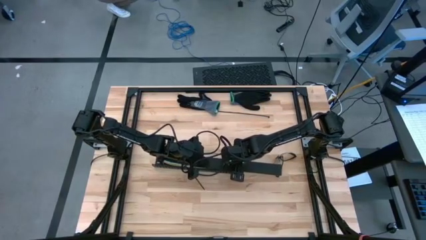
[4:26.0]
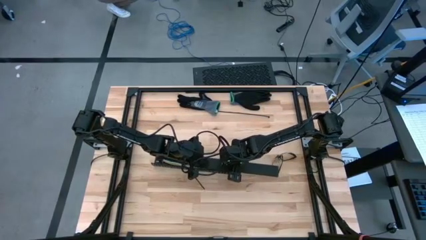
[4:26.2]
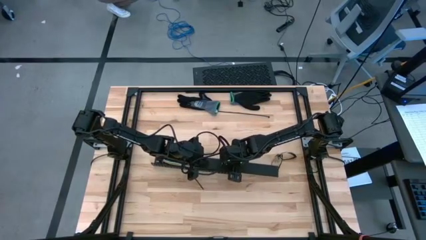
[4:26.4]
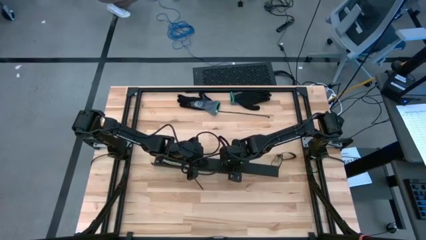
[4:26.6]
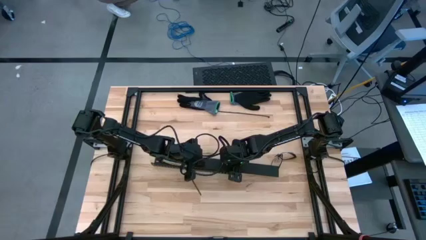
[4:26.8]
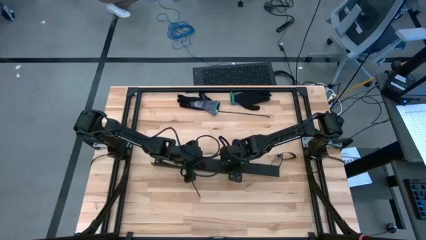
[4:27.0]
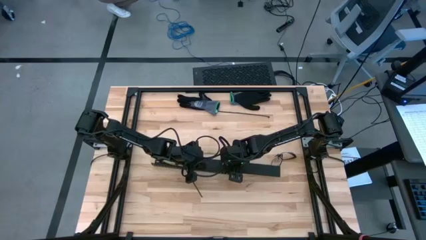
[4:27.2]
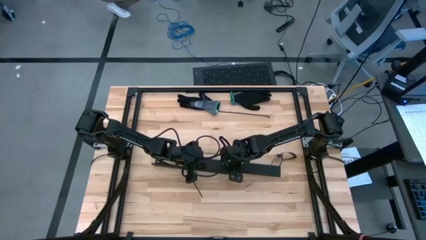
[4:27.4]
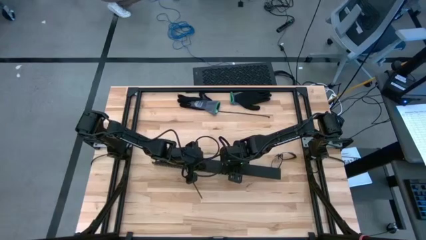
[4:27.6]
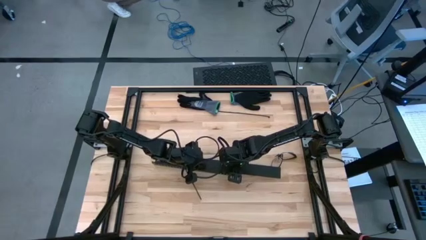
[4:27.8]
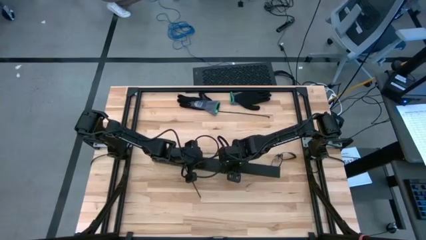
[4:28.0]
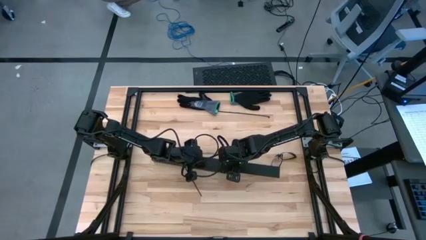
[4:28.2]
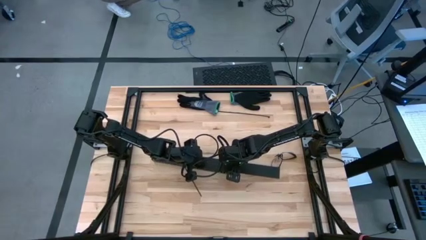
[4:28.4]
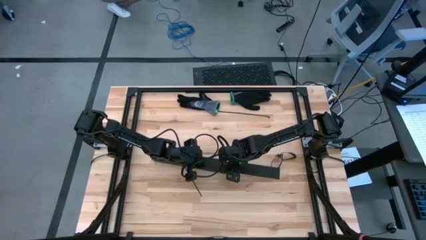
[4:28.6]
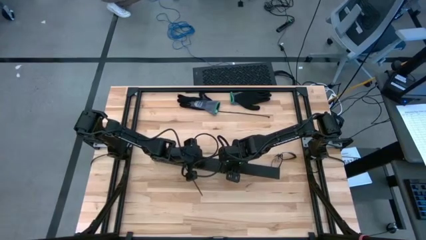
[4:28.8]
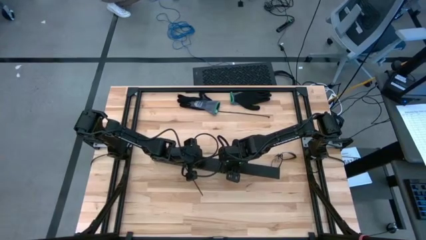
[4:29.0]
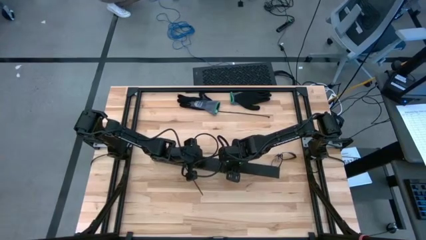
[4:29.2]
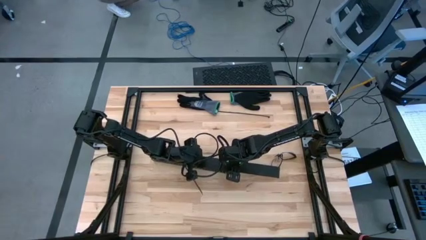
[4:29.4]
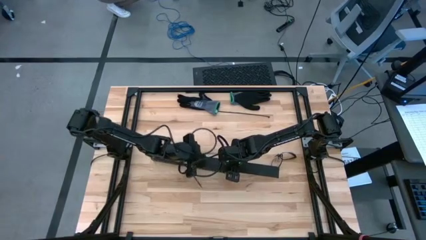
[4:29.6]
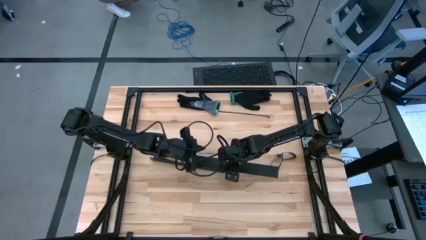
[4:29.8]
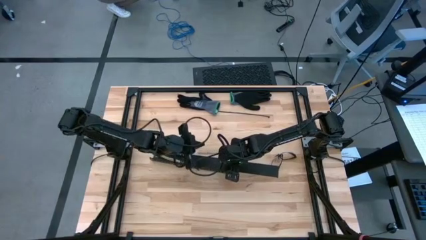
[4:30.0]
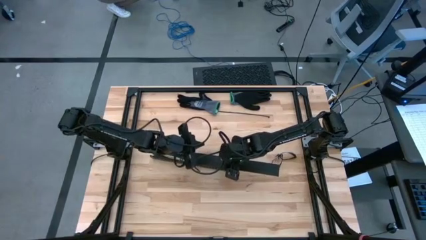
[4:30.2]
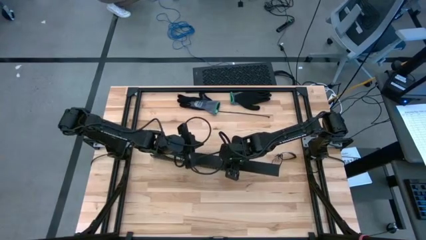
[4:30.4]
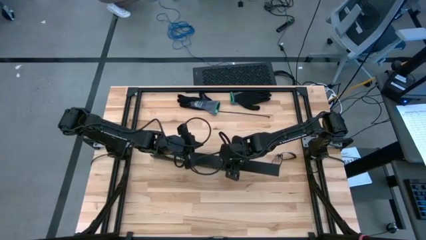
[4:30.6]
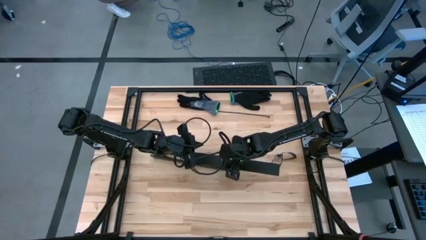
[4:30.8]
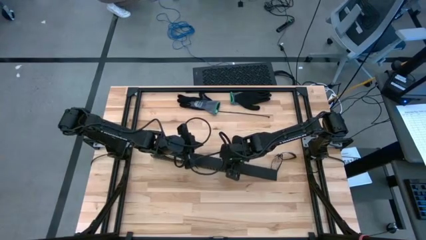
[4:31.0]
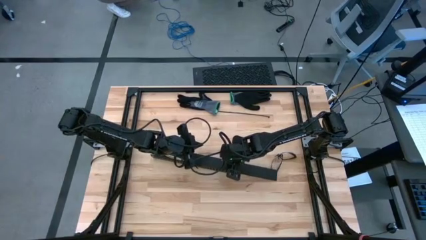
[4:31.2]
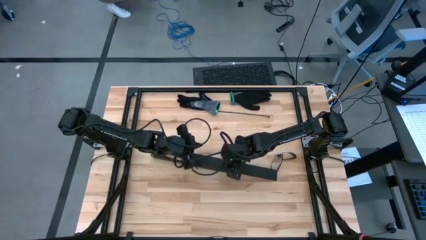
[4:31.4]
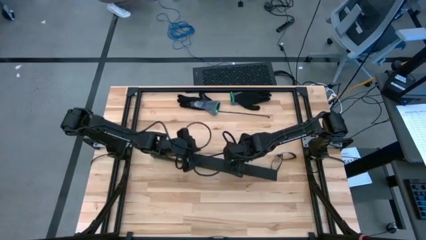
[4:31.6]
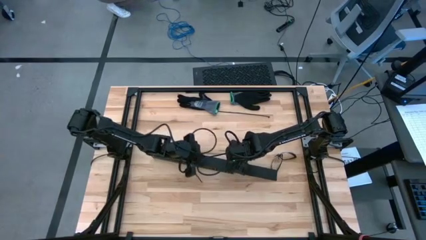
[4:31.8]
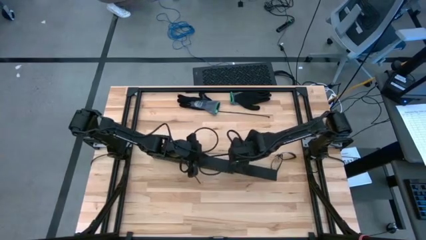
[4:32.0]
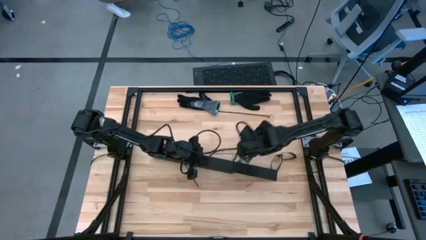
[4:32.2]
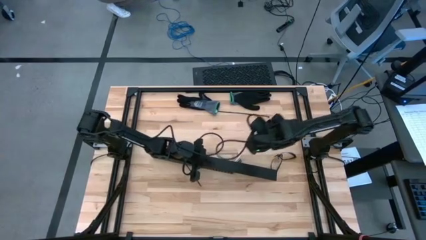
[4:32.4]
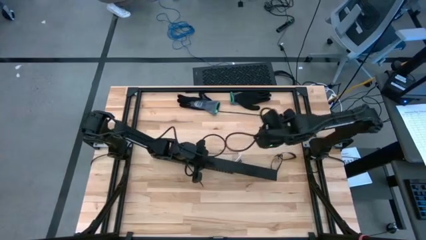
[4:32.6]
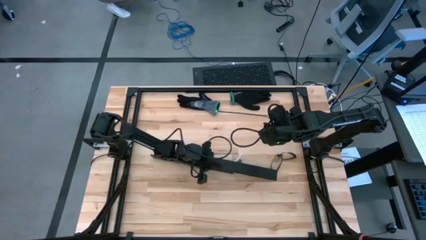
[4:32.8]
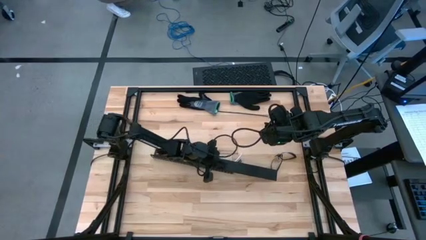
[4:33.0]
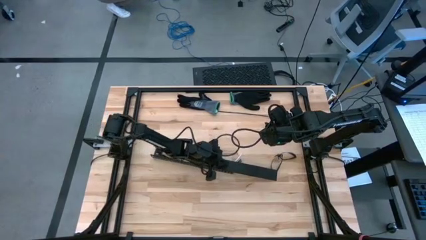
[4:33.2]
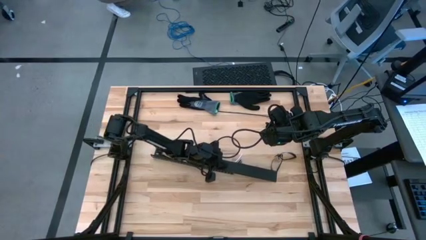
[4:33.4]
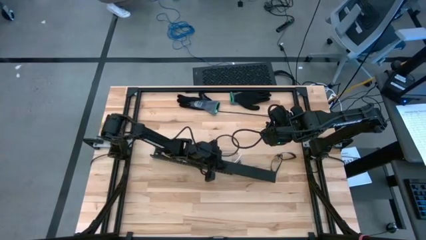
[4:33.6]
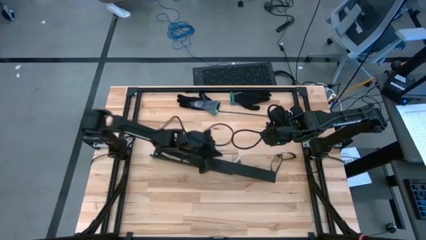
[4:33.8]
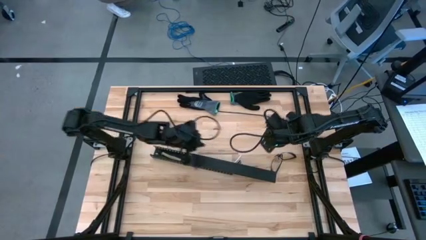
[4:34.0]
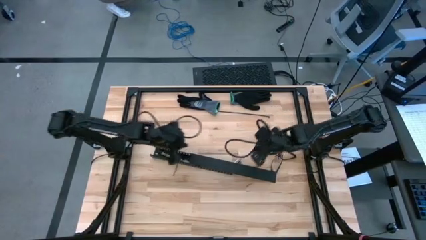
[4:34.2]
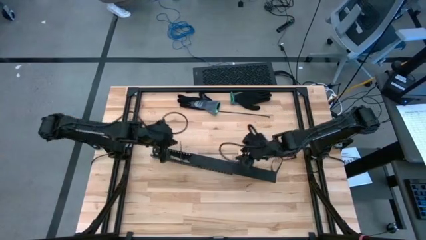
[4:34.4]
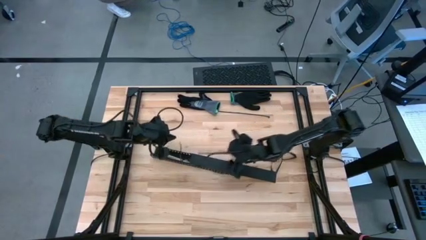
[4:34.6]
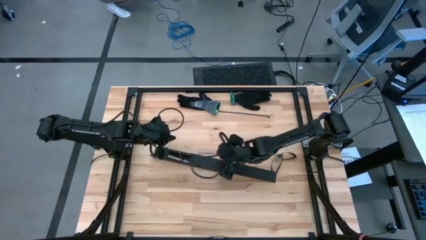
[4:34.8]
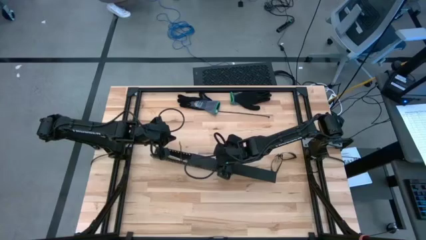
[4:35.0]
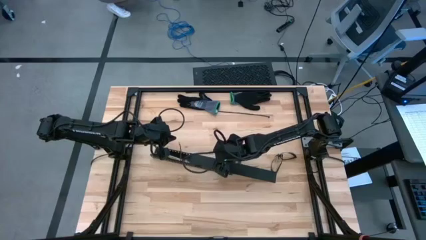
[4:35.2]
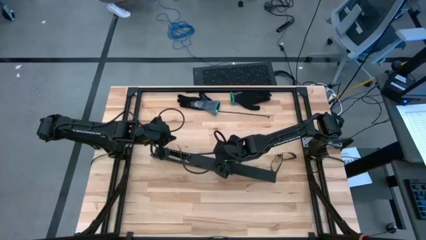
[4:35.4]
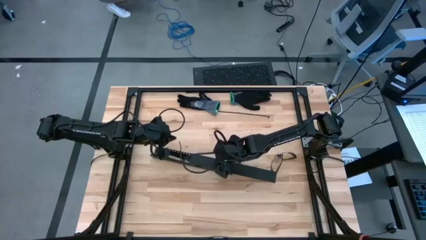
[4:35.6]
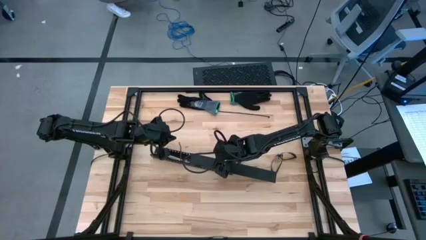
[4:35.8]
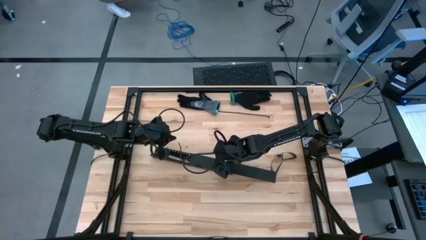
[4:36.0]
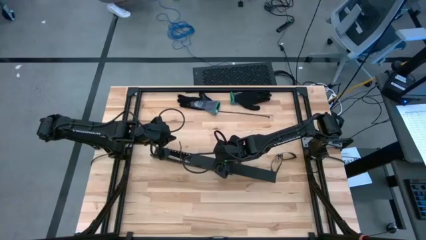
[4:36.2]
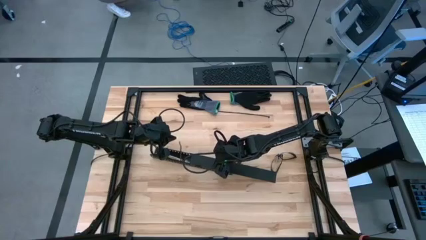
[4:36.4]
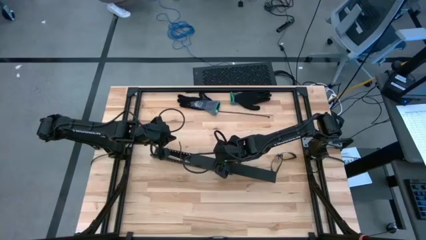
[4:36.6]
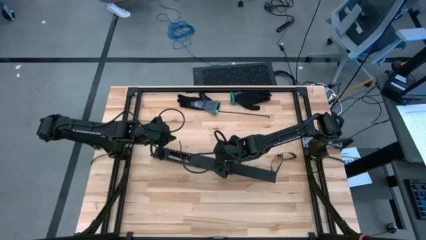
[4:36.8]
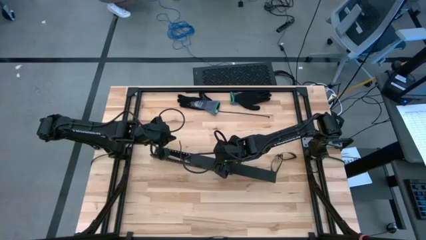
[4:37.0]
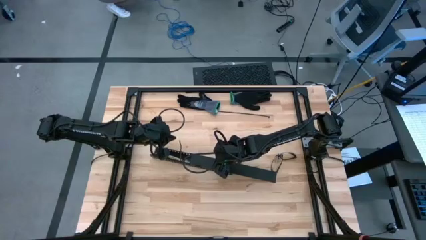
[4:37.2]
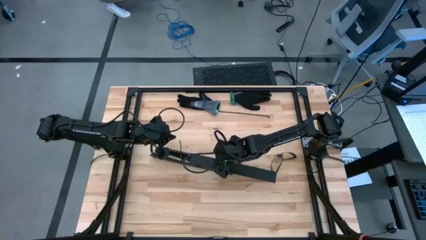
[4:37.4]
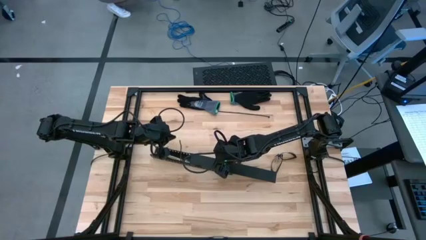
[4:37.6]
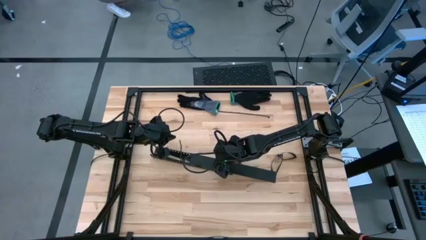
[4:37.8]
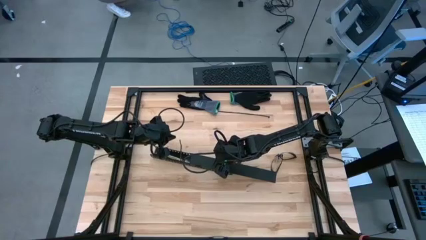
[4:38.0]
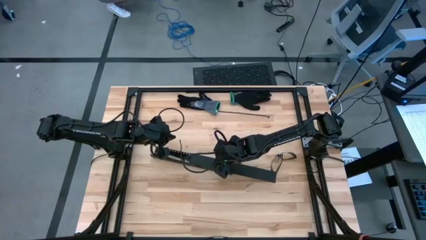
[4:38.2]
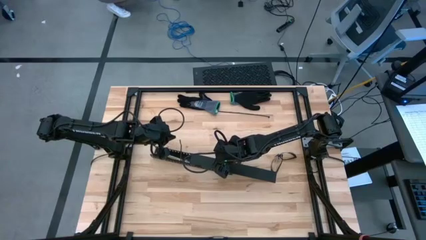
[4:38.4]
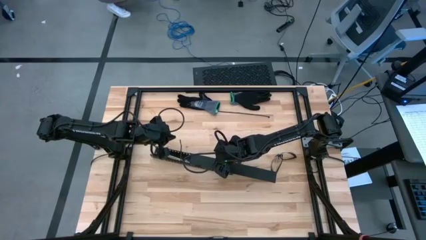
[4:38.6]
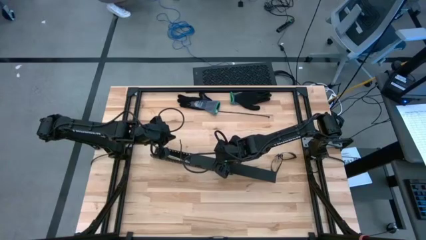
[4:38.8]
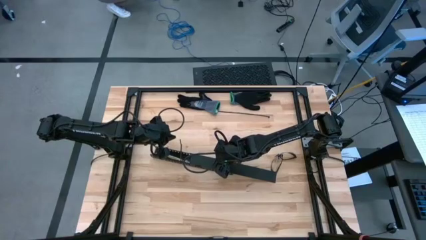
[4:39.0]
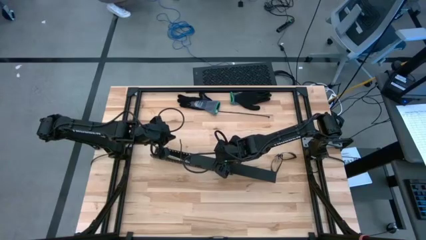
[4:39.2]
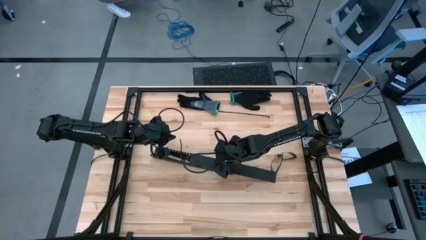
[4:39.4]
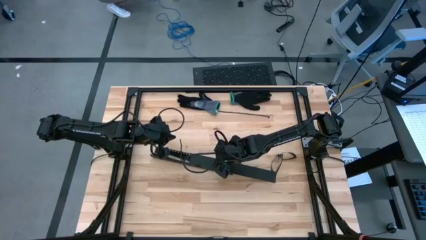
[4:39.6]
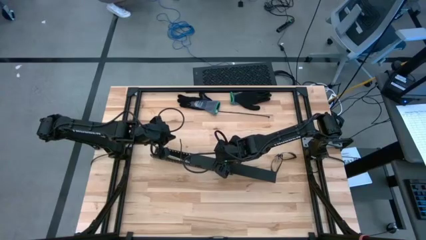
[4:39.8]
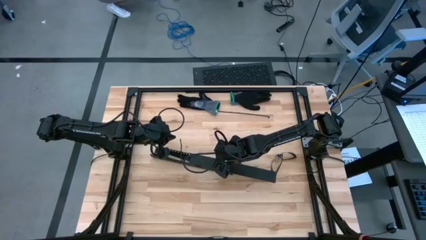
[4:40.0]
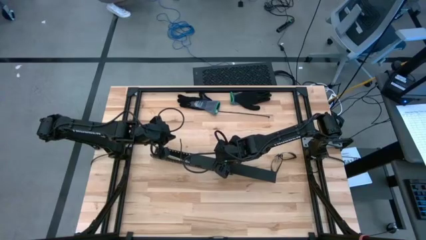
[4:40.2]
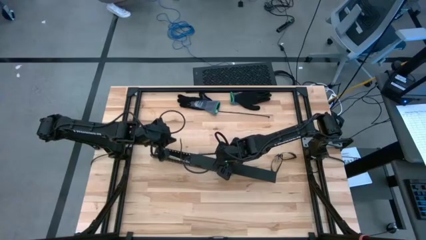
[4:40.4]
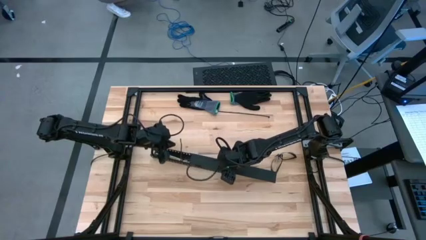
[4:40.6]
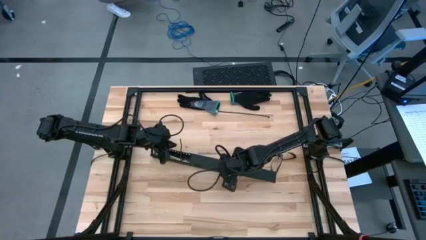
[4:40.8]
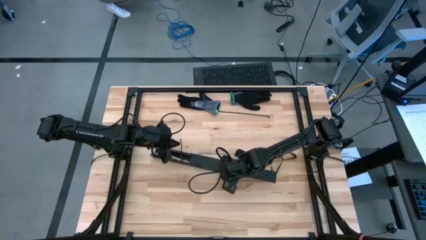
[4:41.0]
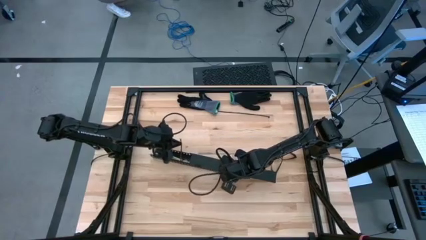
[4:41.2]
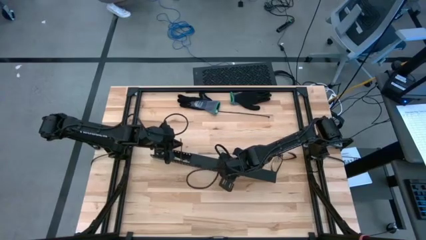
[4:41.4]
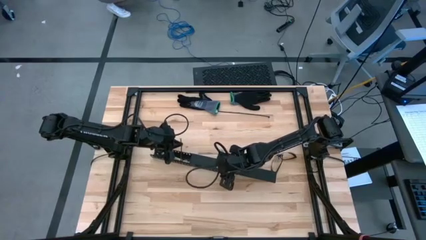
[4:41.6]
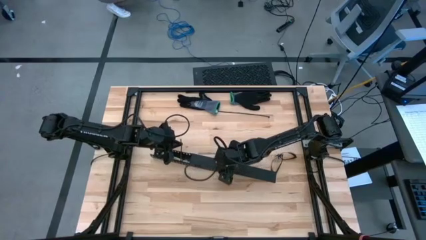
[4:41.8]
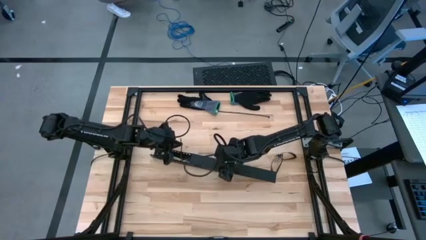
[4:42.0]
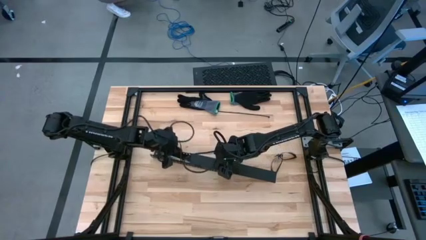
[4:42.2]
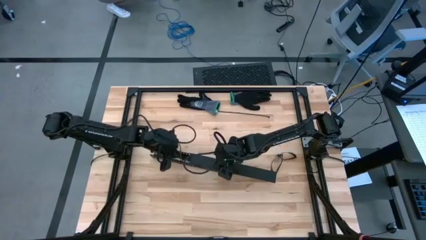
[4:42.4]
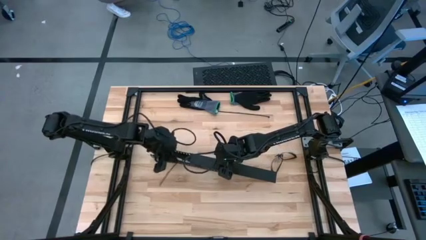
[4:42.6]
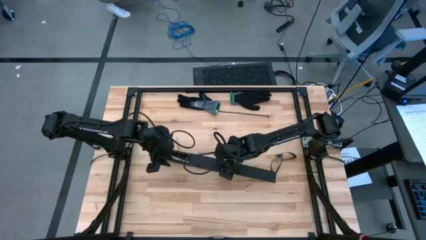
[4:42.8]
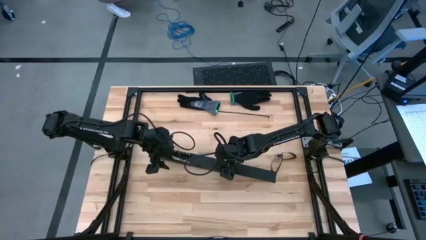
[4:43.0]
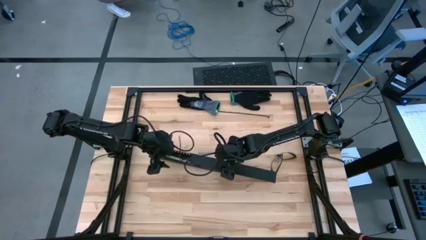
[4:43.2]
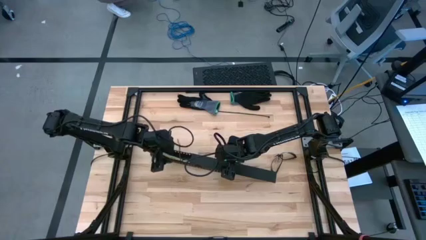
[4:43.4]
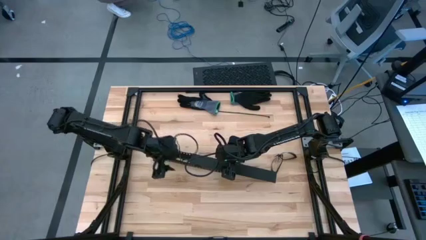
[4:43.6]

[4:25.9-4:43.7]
Task: Ziptie cables
Close the black cable duct
